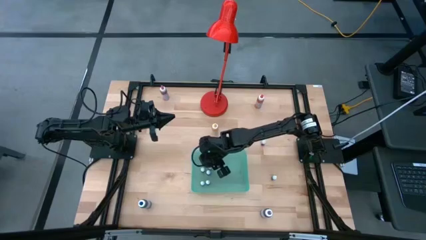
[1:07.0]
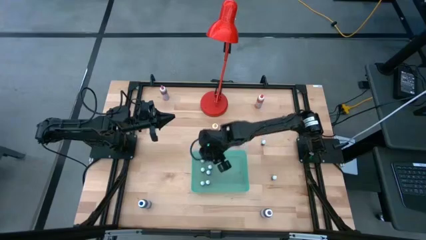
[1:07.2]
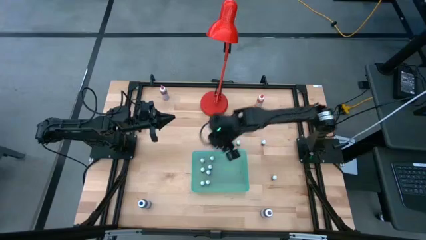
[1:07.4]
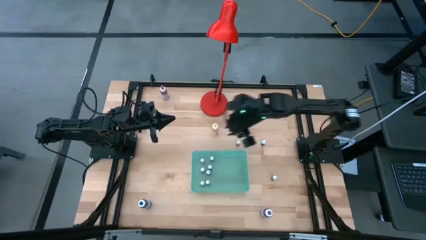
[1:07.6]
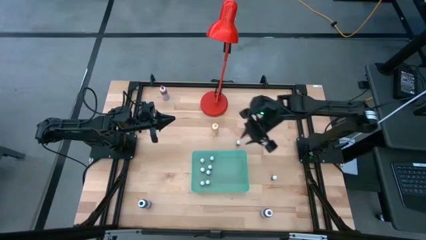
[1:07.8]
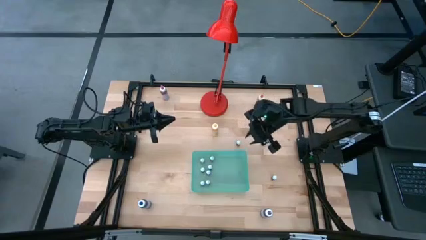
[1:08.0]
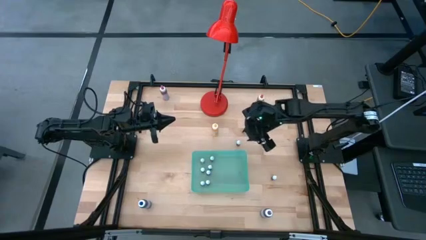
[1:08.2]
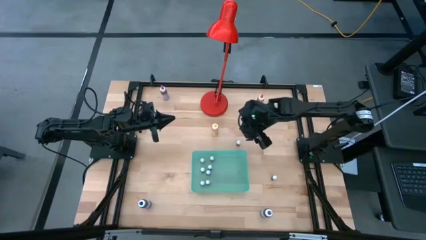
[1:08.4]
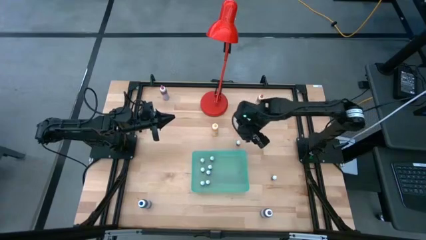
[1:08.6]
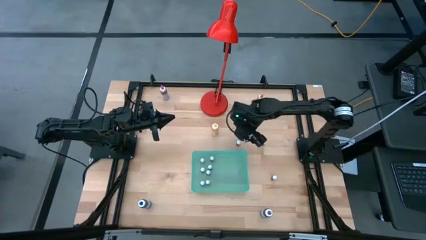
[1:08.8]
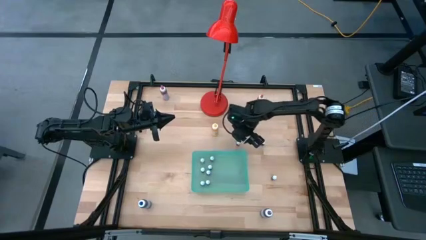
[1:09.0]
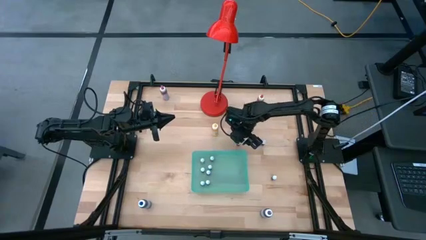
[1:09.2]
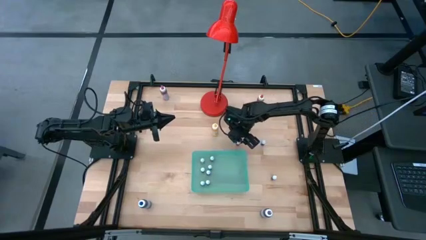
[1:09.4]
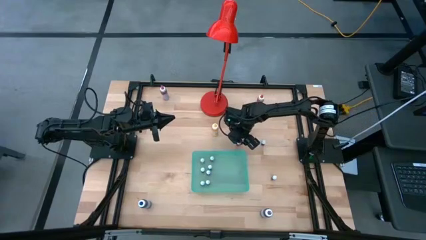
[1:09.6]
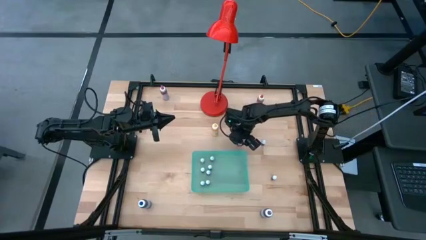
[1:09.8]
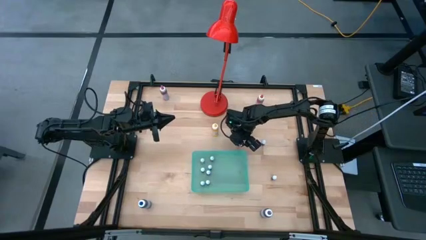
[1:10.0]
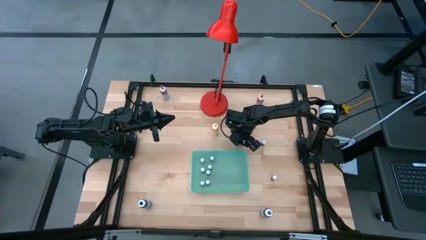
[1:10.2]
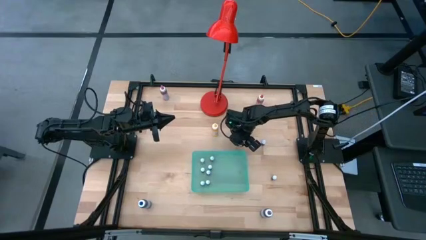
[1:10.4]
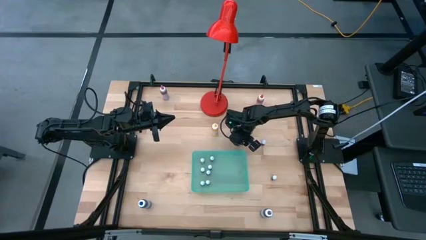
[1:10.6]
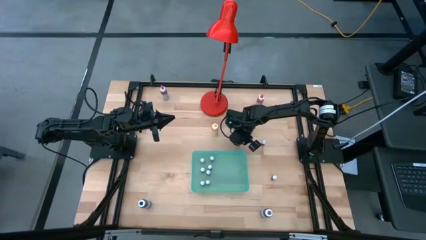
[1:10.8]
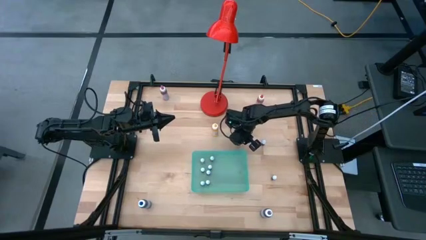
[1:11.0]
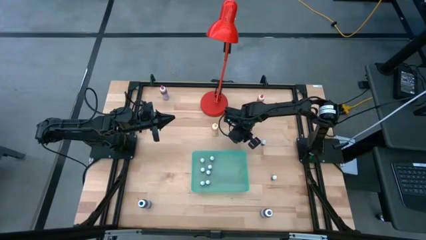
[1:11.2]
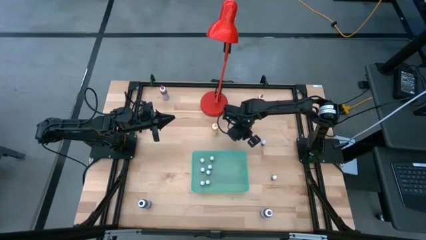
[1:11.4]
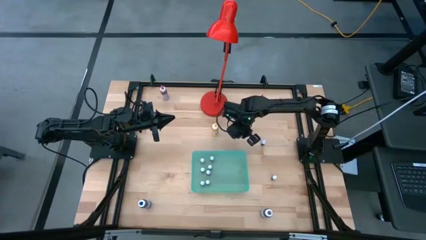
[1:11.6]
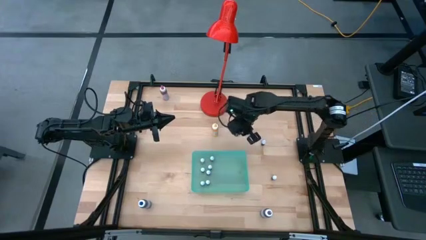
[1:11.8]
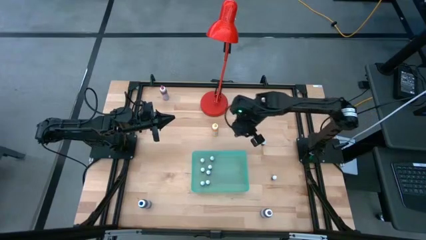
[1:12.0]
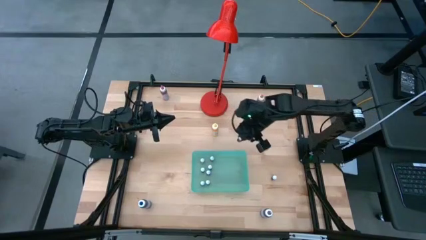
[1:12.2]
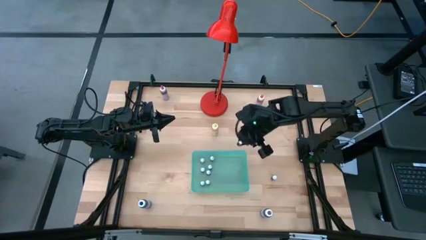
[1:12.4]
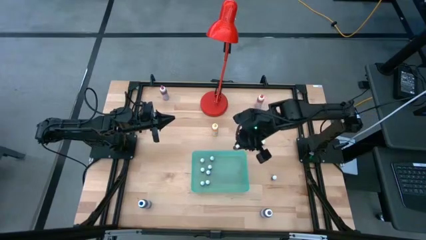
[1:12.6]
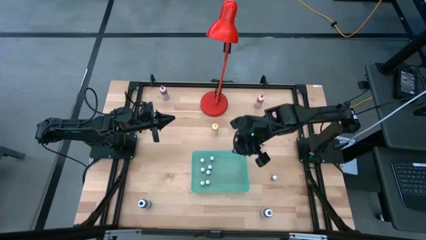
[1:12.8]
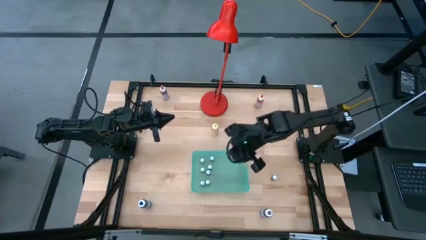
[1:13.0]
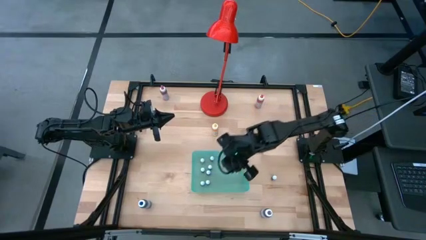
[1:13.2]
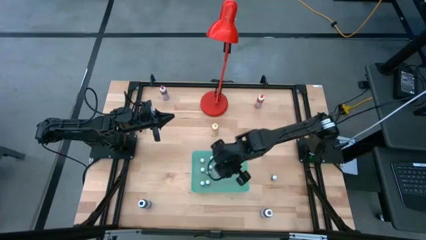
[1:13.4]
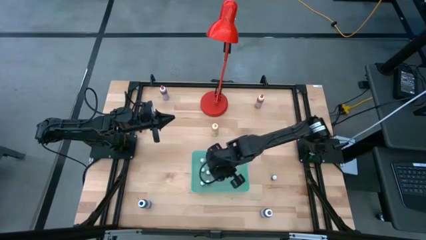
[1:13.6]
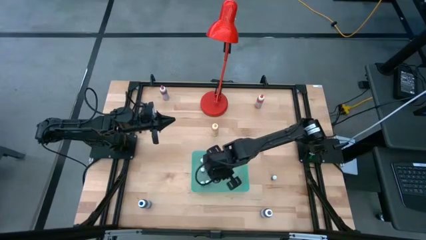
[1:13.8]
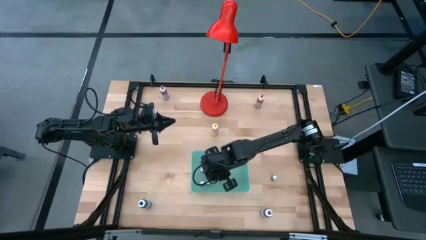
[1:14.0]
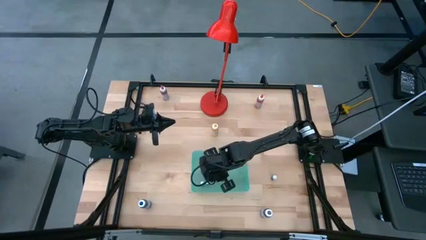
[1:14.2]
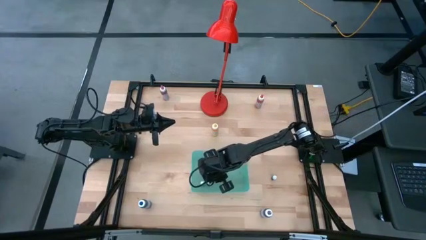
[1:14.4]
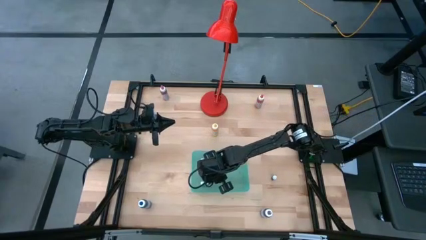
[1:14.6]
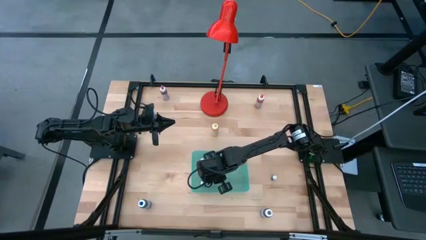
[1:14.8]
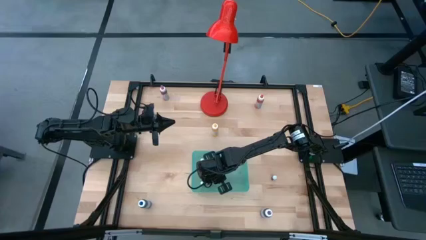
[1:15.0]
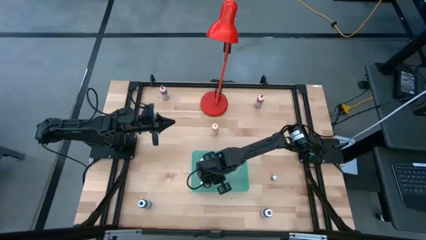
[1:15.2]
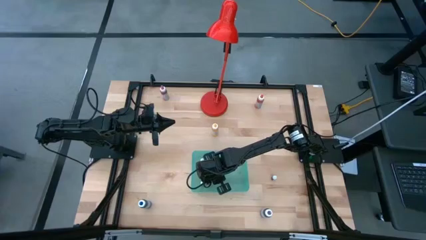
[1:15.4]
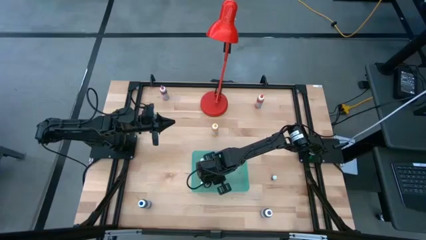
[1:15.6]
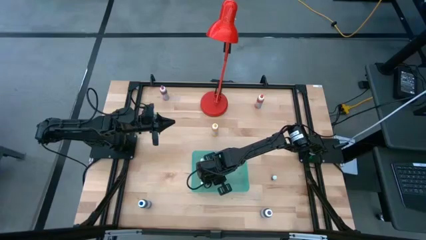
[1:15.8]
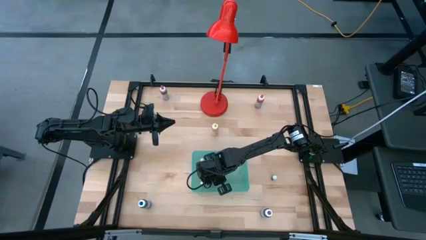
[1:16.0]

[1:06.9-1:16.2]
Task: Pick & Place food coloring
Put the small red food coloring bottle into the blue bin

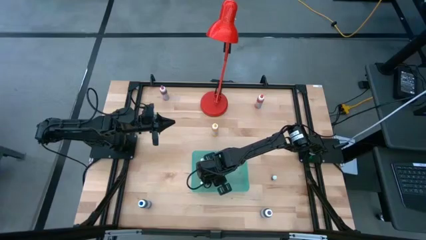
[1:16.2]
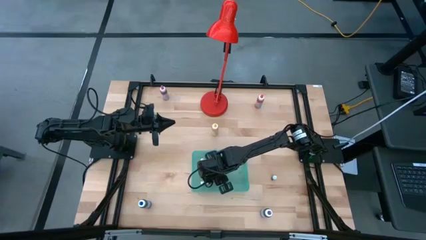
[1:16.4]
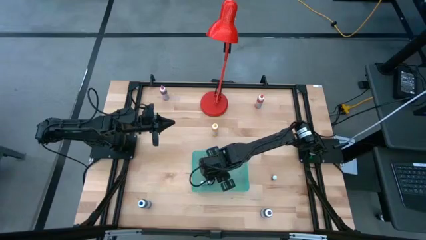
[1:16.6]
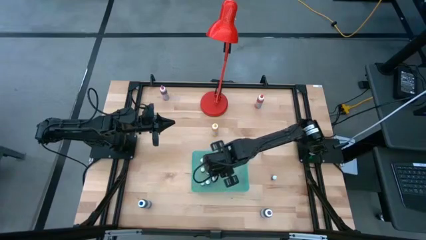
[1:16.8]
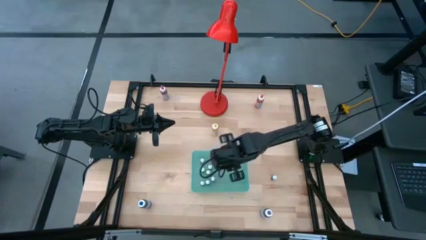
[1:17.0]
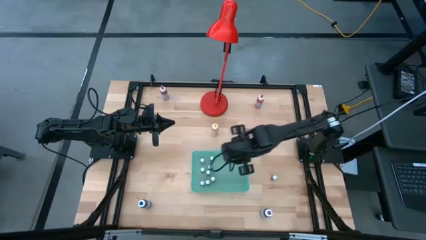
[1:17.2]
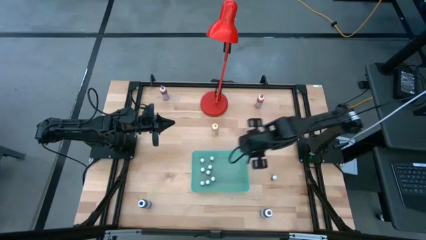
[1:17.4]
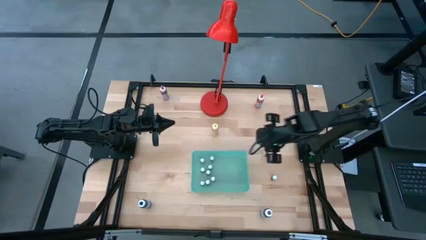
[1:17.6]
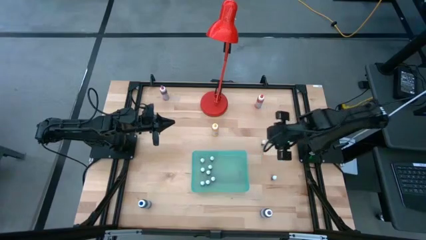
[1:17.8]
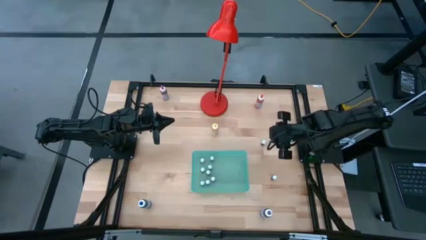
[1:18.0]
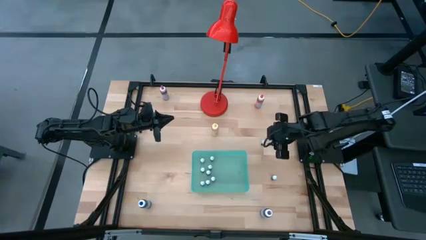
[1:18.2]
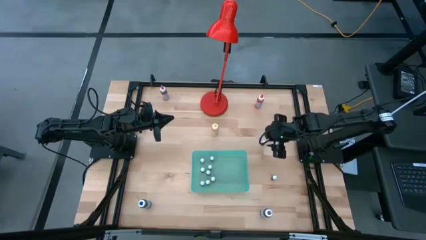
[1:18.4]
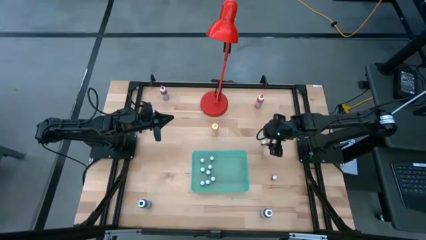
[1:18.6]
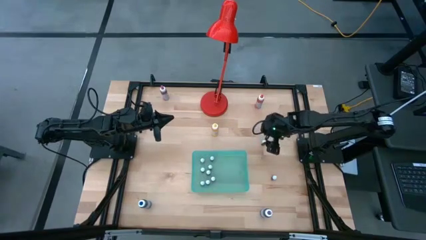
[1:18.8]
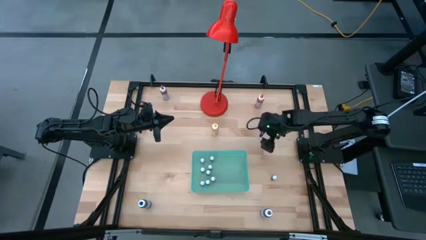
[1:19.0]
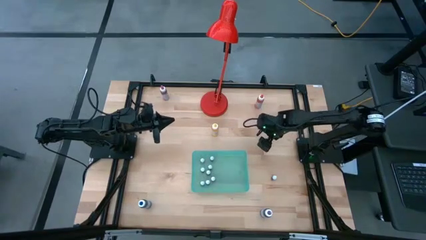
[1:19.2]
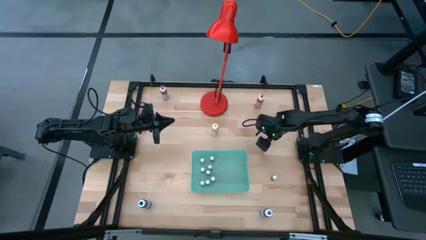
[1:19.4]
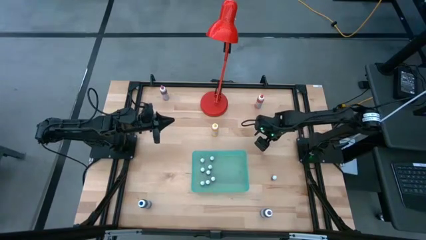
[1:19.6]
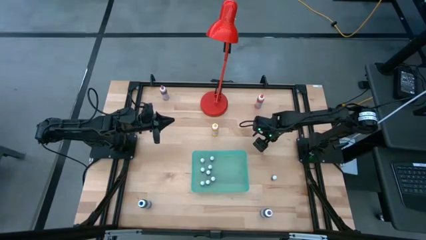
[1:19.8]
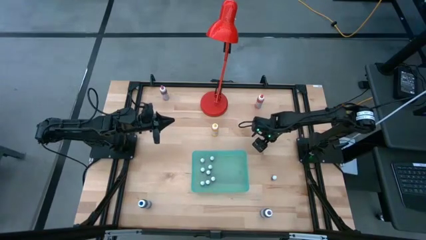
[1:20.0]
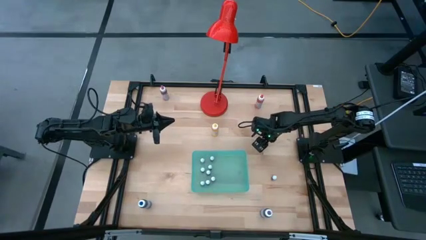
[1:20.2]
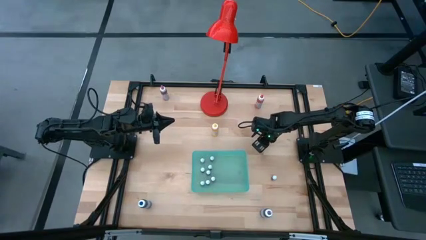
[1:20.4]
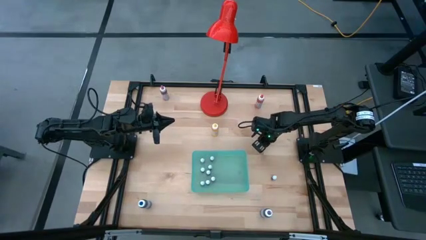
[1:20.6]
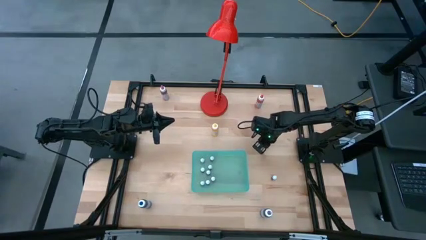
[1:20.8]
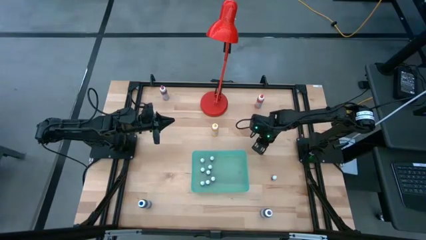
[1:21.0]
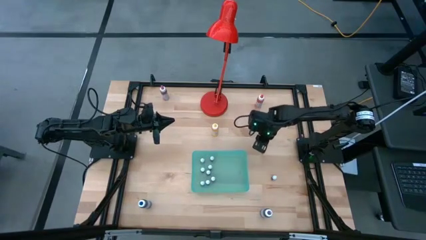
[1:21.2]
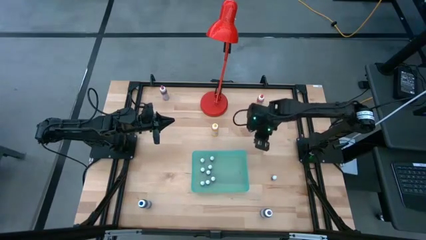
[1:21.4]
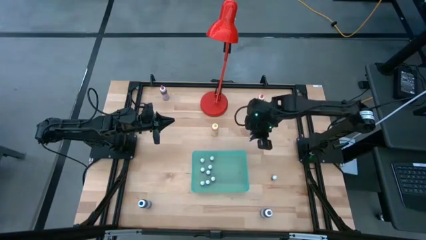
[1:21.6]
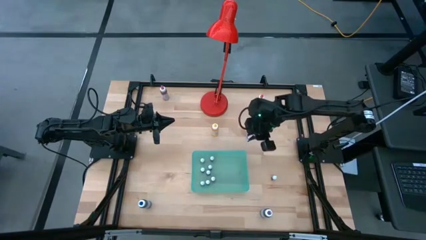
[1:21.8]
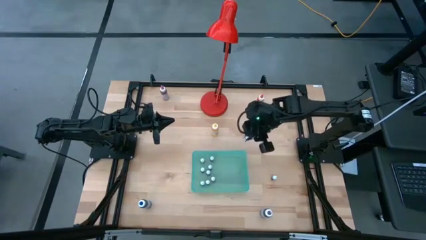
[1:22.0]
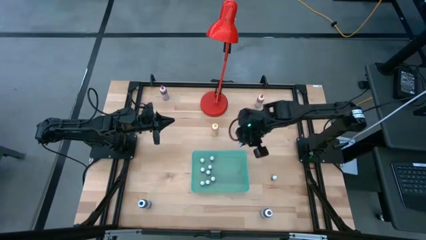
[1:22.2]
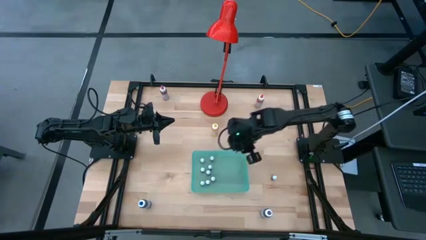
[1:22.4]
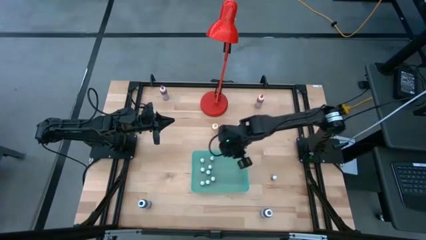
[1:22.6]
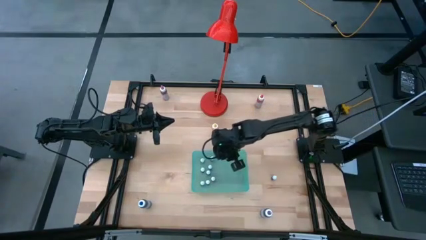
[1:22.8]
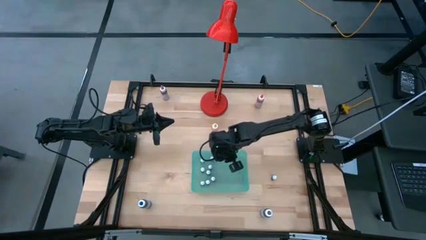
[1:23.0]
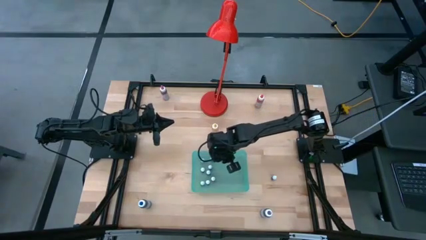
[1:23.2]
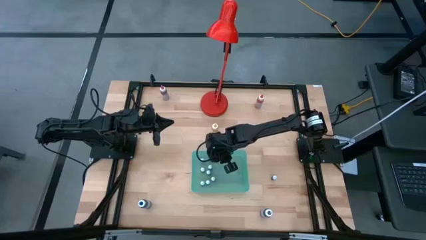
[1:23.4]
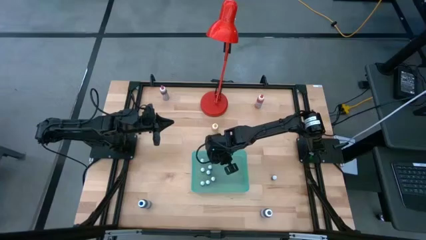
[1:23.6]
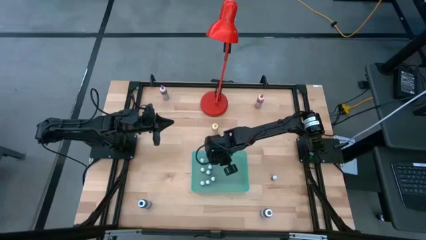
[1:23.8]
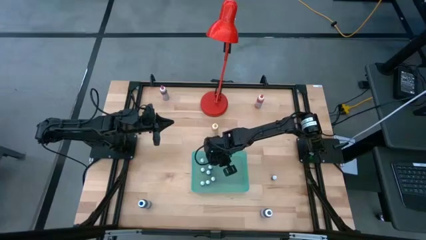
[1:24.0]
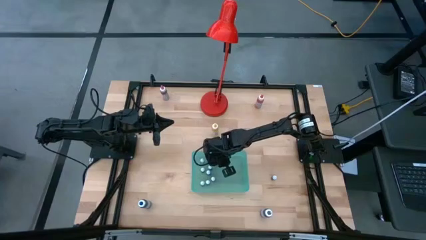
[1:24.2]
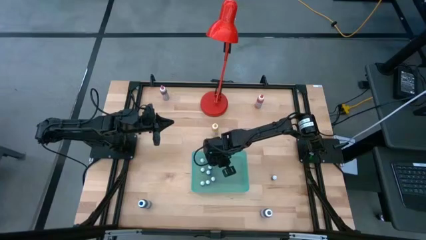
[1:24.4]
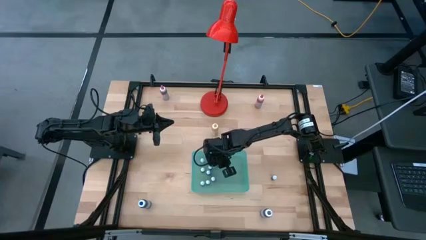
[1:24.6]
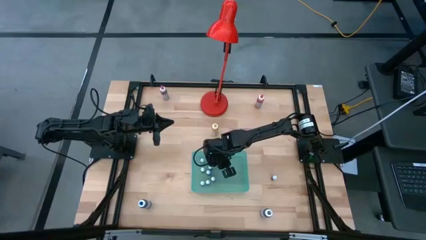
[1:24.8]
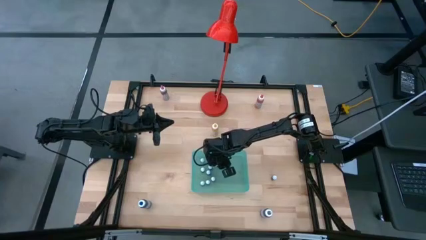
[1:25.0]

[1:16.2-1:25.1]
Put the small green food coloring bottle into the blue bin
